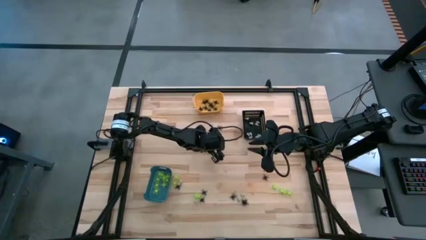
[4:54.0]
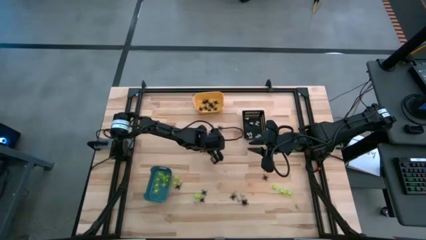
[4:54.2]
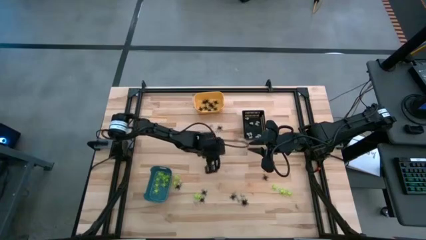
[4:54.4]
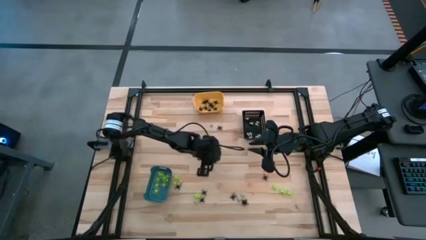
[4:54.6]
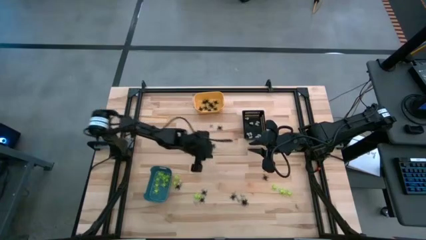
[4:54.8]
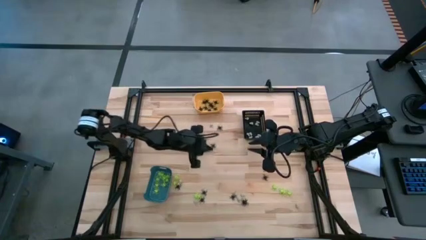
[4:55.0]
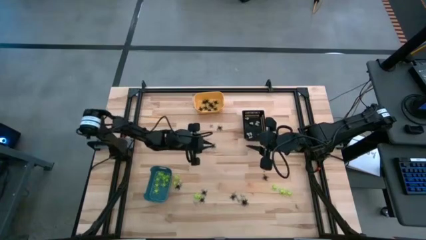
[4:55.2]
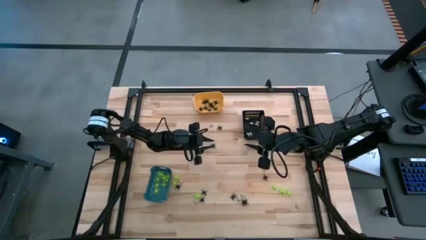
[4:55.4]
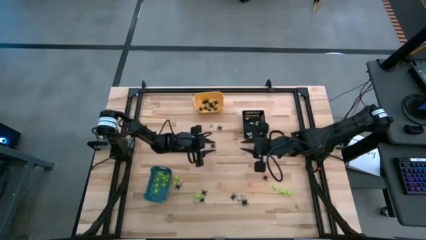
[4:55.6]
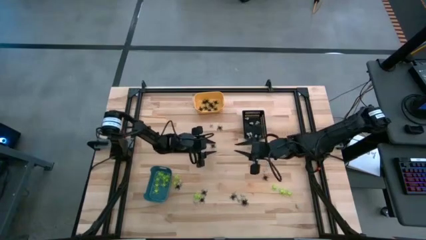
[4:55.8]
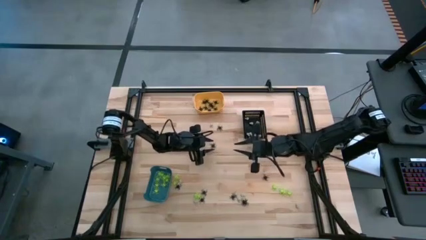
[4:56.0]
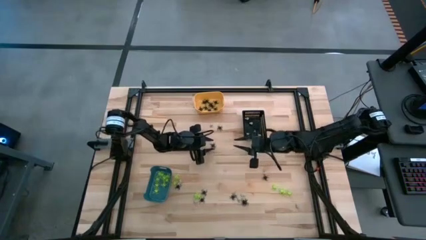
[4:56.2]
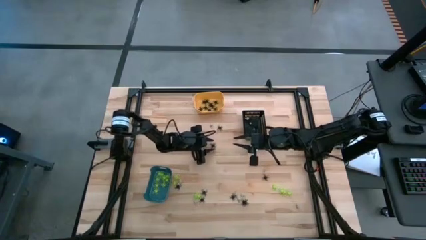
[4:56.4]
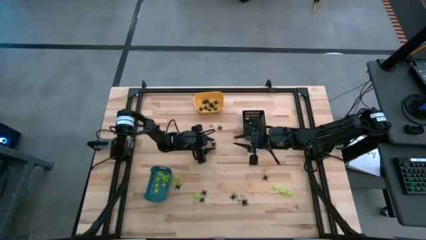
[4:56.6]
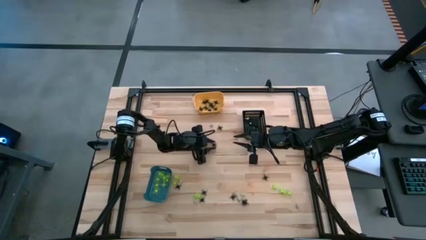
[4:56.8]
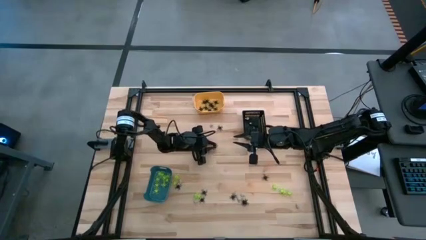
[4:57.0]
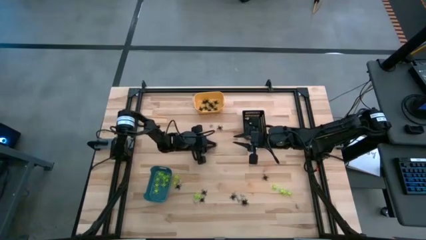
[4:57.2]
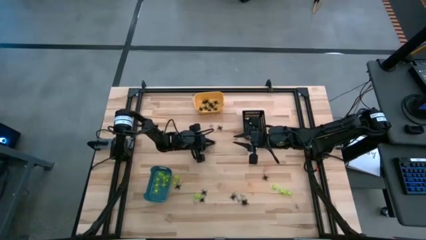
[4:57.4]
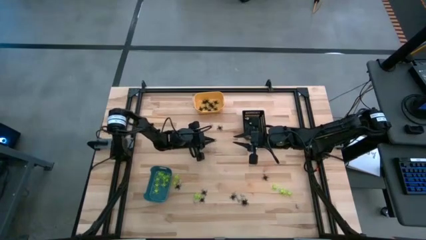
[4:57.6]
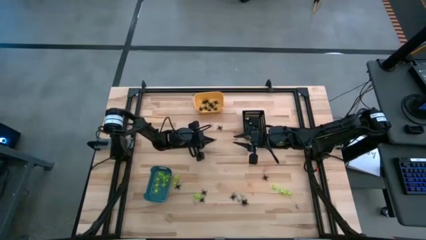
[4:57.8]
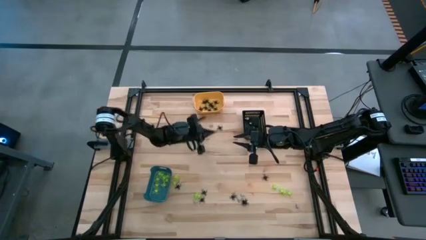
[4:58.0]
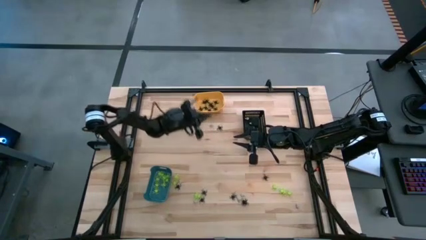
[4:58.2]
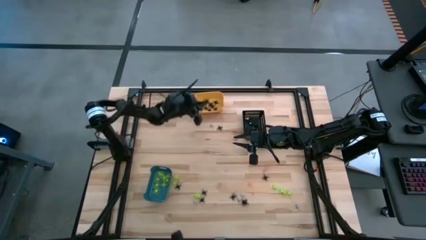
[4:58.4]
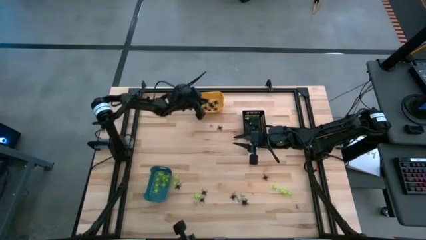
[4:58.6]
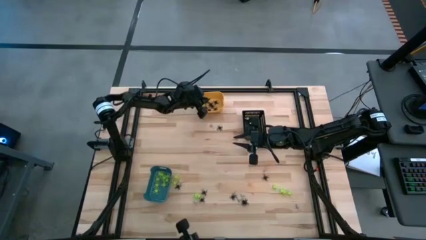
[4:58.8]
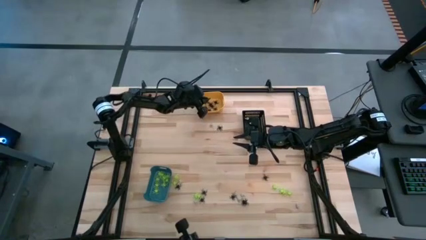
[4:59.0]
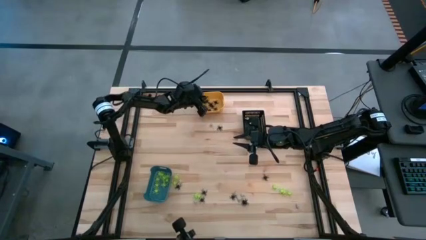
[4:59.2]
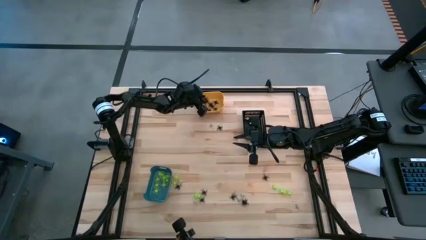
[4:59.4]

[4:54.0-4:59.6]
Task: Sort Halloween decoration
Put the black spider toy into the yellow bin

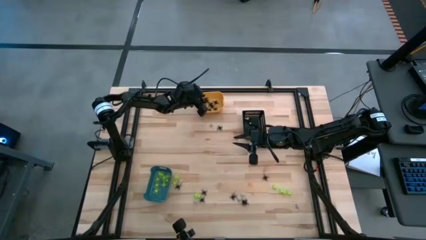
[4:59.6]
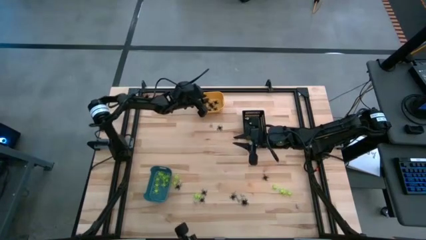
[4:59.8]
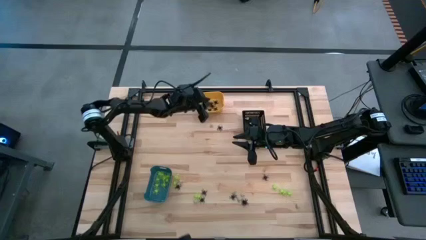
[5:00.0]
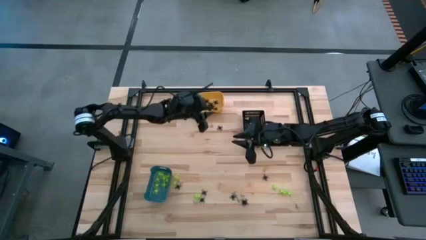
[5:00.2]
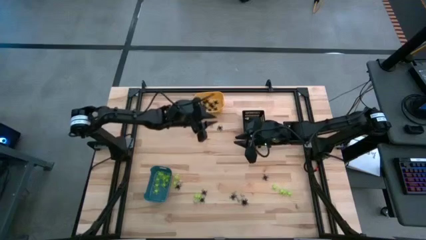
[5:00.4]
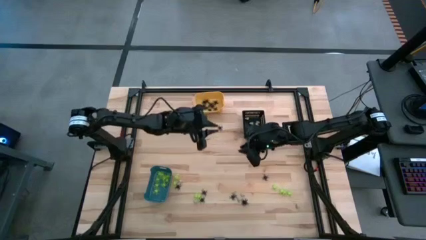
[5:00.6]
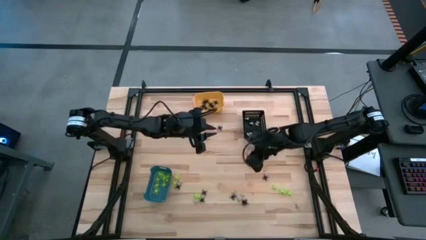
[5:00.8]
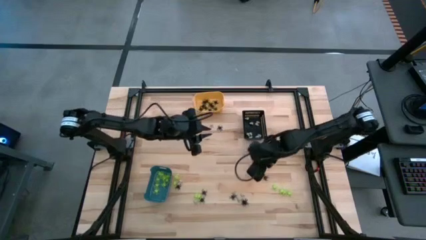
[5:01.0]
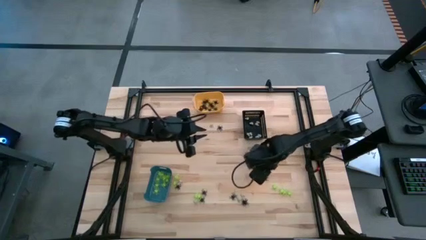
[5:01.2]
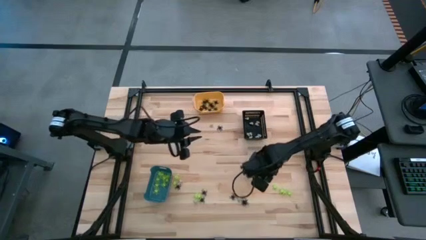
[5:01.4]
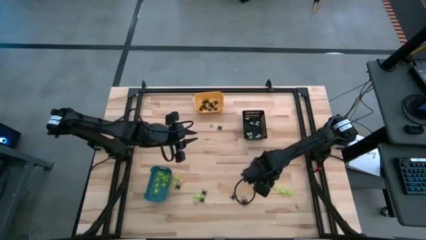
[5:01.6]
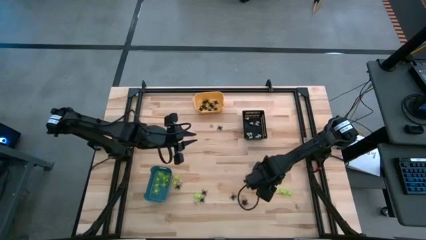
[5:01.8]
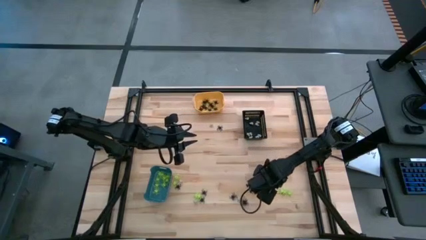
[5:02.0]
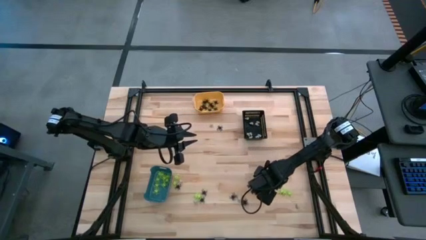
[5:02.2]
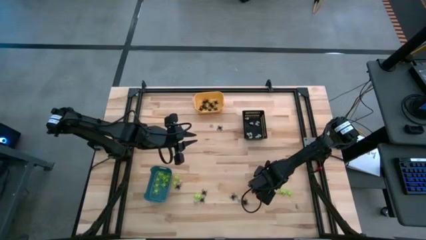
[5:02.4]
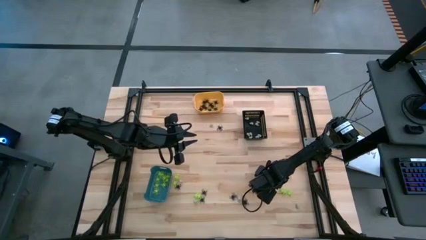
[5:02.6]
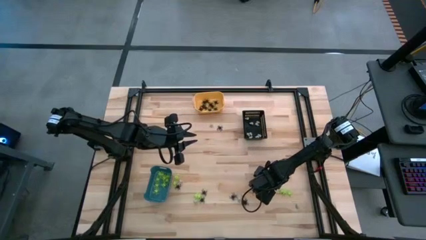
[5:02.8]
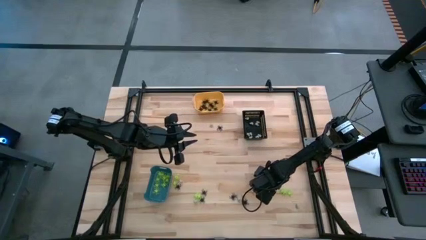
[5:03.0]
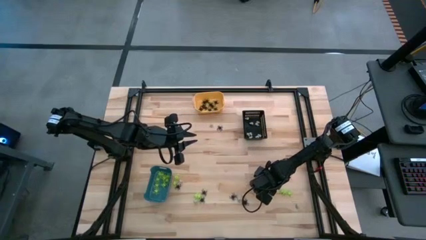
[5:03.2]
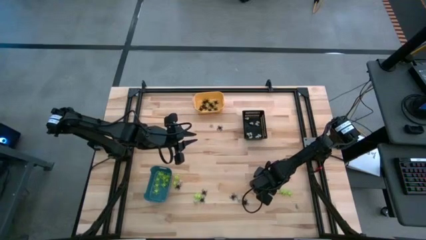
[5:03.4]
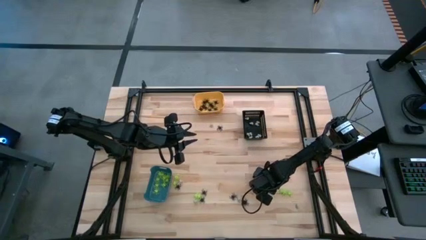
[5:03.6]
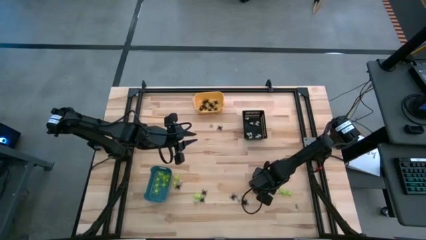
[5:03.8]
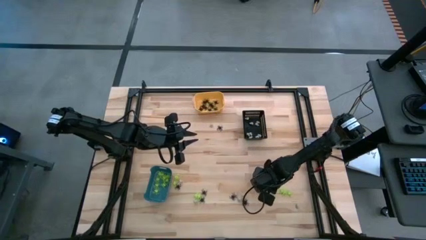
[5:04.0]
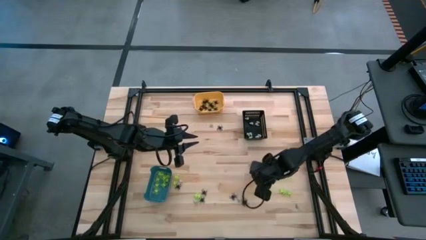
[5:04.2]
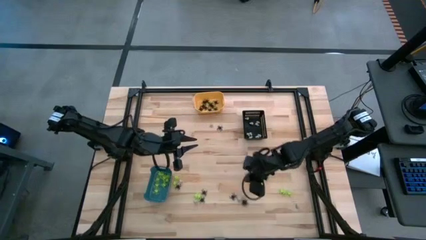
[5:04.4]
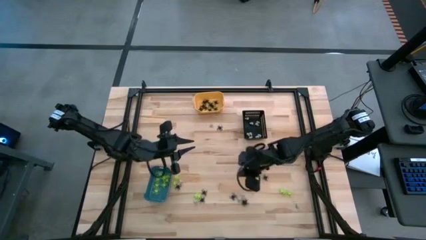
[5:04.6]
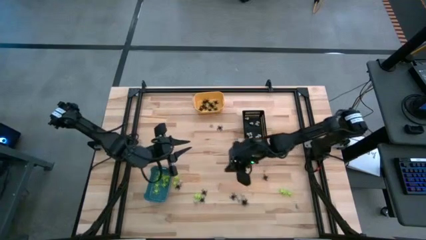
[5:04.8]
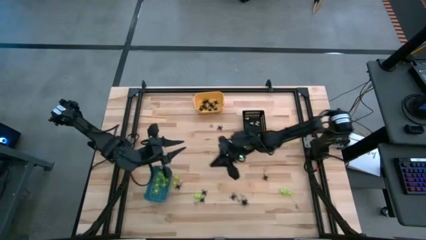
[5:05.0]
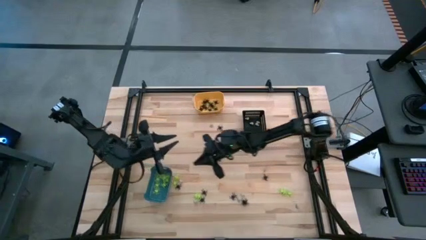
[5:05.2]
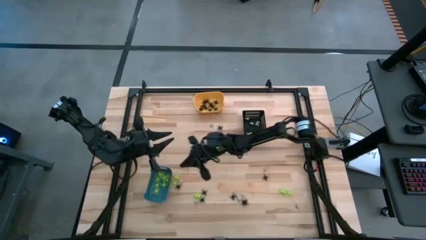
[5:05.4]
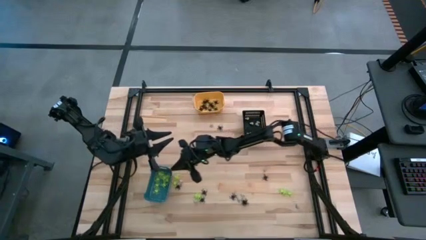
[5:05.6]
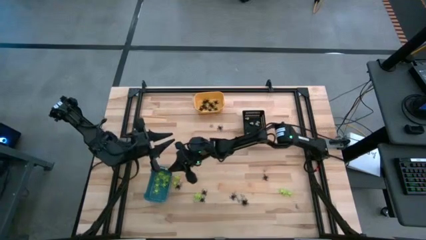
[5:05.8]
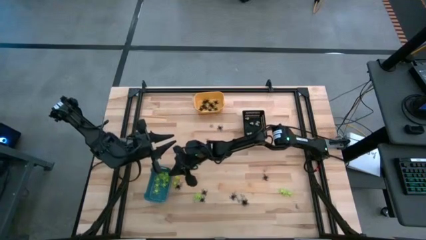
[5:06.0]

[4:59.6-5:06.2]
Put the green spider toy into the blue bin

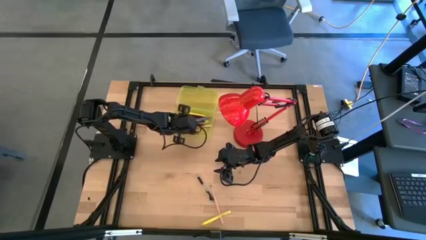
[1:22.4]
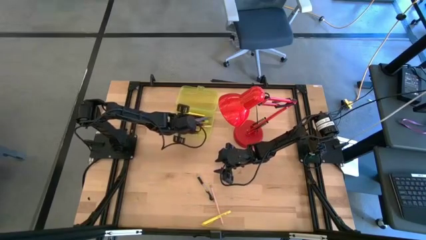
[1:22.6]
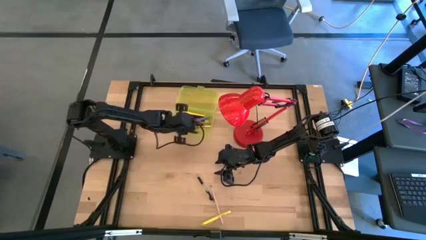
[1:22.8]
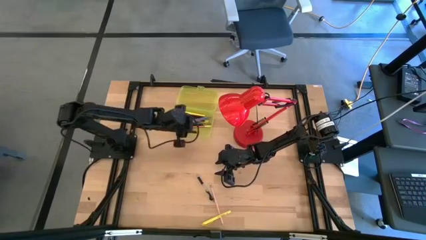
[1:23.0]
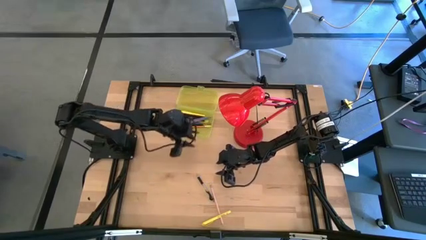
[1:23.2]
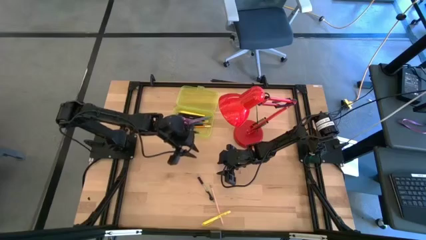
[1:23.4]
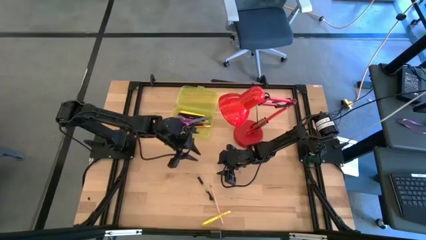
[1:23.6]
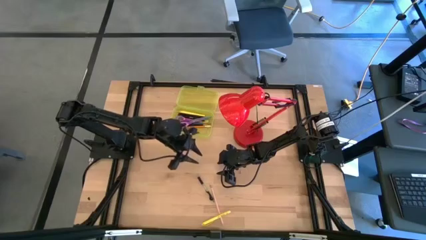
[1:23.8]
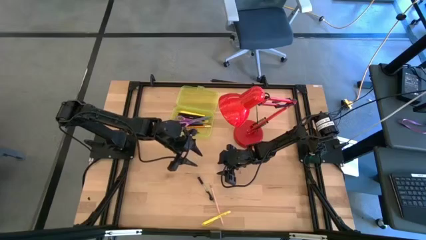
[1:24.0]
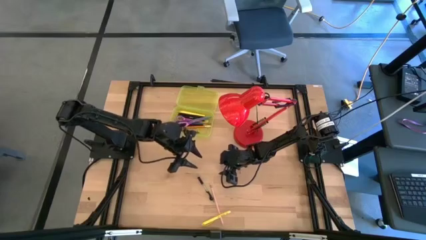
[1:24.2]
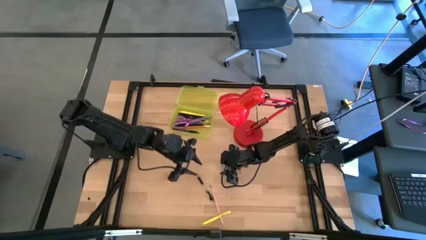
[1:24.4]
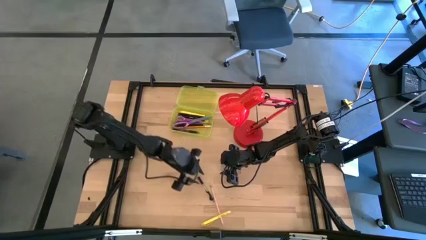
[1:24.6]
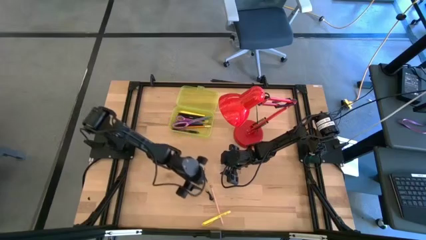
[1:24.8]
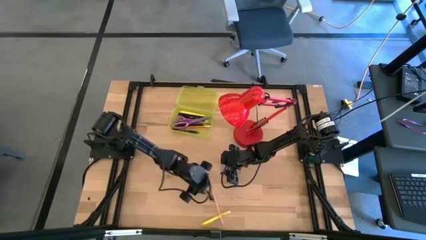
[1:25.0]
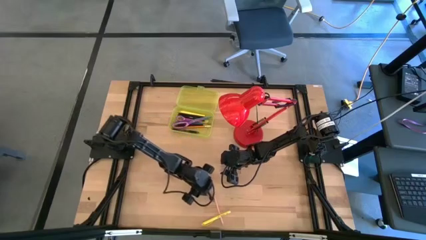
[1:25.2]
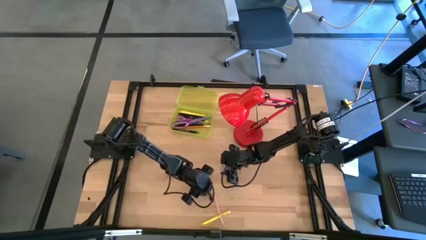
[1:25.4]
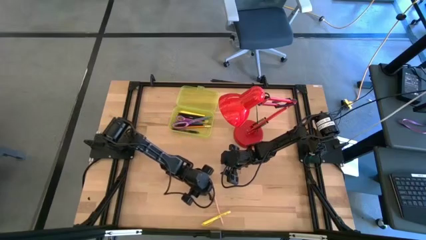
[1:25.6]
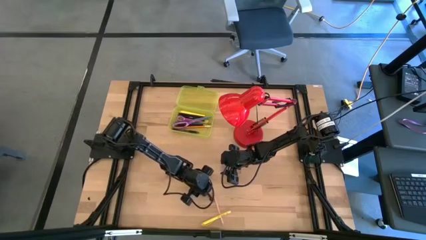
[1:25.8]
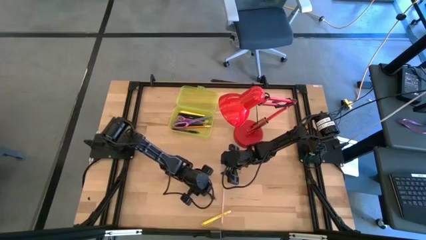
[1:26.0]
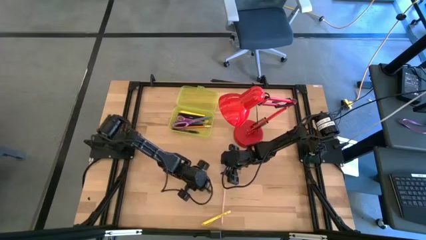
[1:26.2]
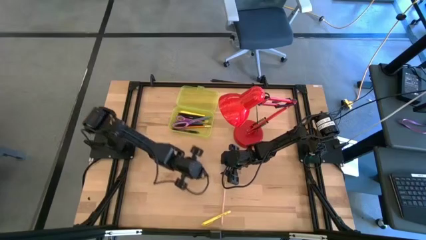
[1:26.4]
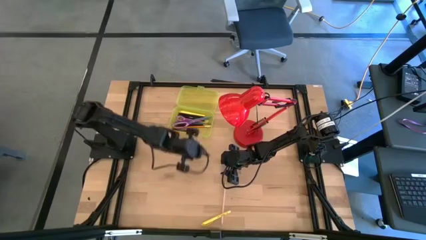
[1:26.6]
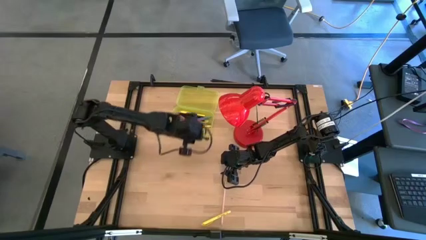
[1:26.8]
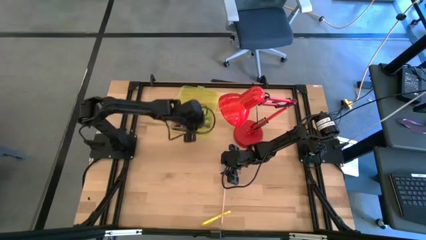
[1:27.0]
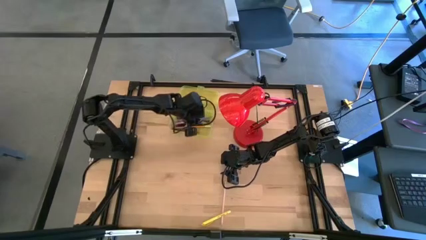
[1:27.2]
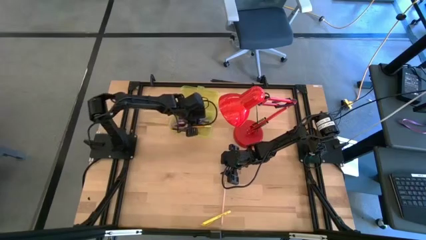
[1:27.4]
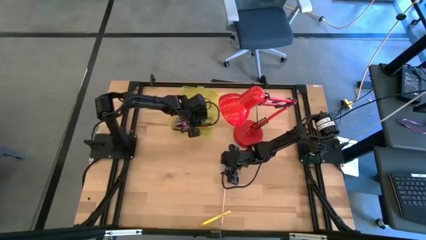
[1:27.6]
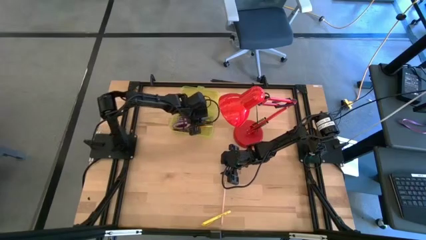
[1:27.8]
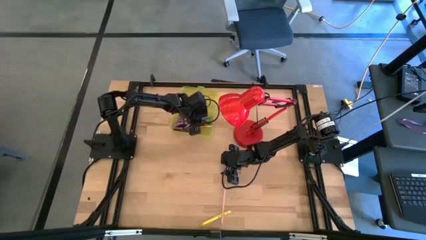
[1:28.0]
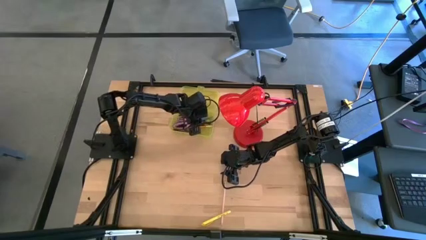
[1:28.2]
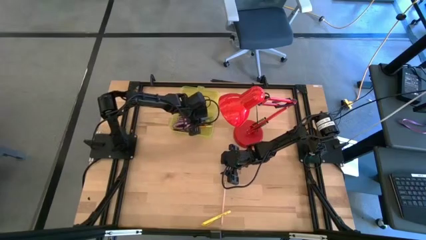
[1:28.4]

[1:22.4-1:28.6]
Task: Pick & place school supplies into a supply box
Put the black transparent pen into the yellow supply box
